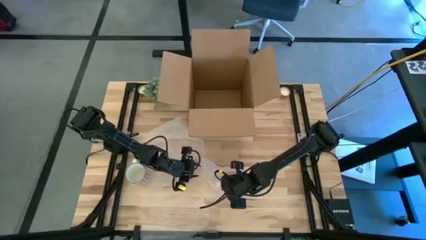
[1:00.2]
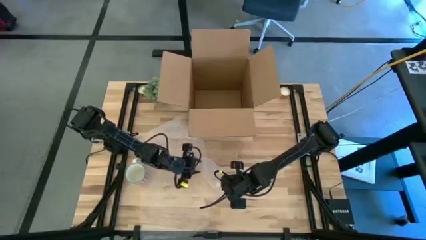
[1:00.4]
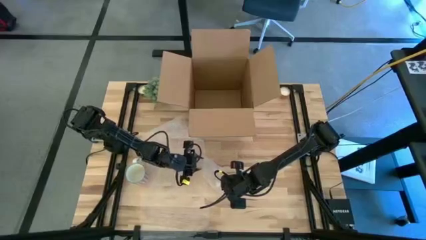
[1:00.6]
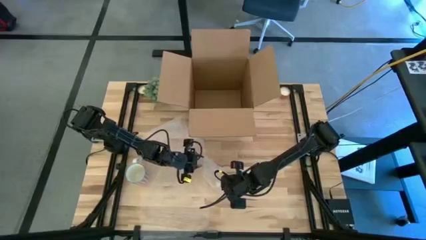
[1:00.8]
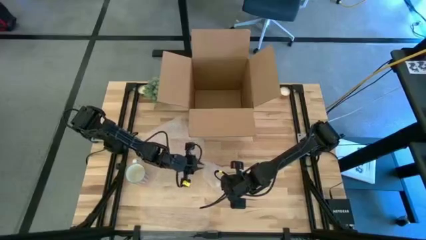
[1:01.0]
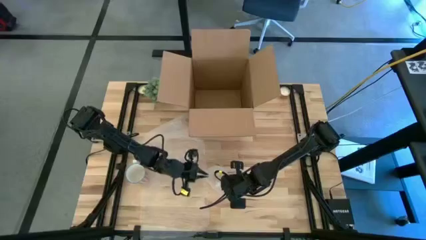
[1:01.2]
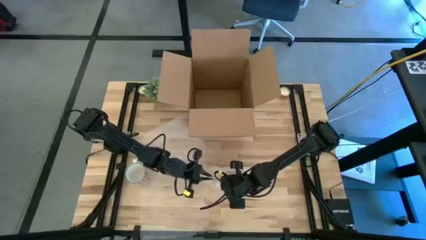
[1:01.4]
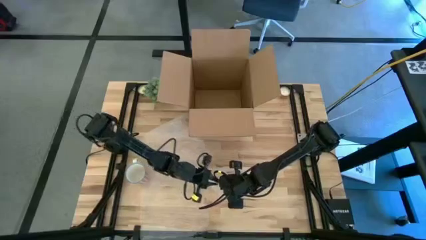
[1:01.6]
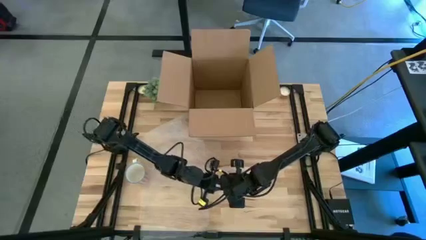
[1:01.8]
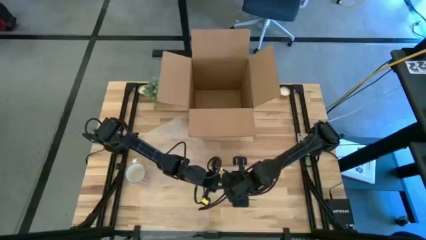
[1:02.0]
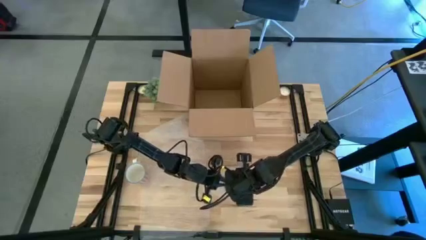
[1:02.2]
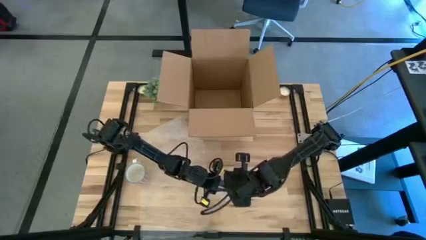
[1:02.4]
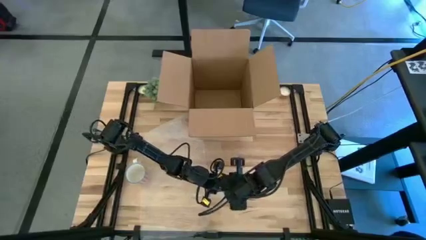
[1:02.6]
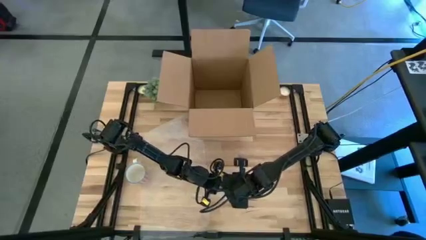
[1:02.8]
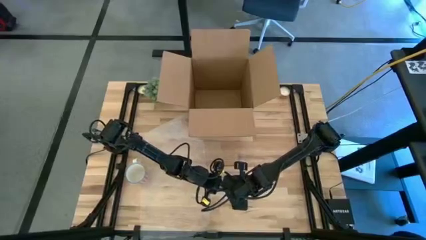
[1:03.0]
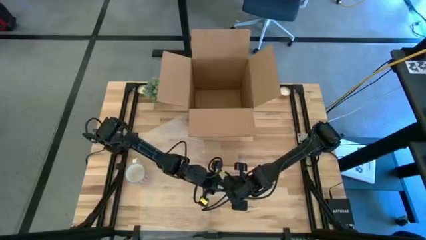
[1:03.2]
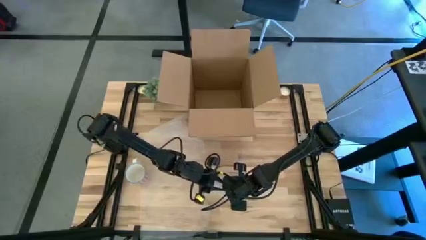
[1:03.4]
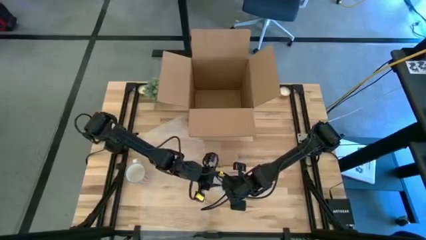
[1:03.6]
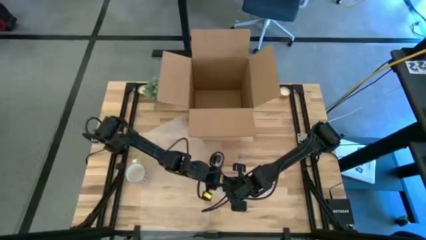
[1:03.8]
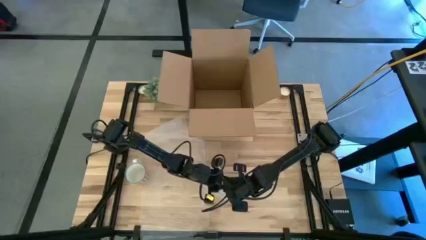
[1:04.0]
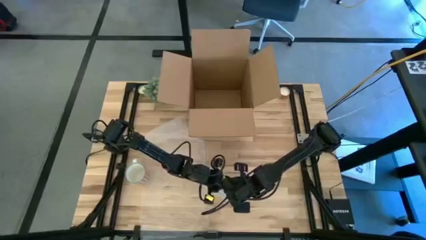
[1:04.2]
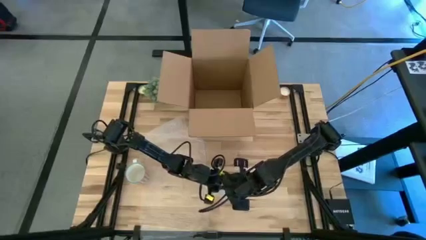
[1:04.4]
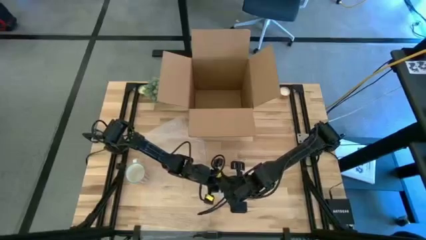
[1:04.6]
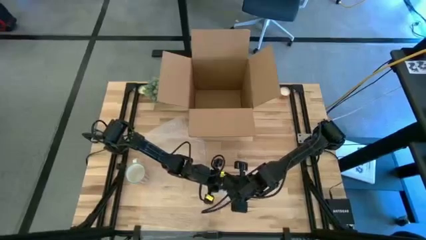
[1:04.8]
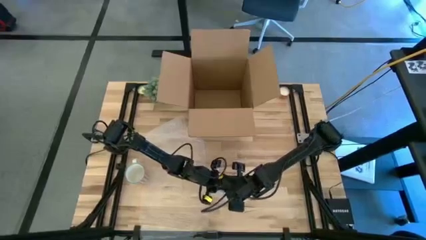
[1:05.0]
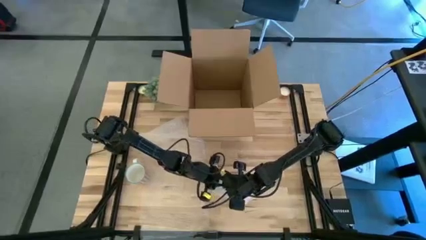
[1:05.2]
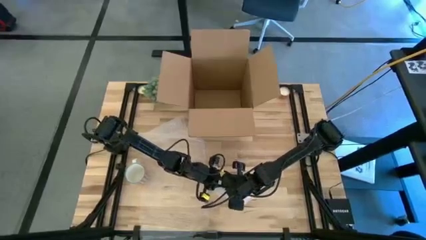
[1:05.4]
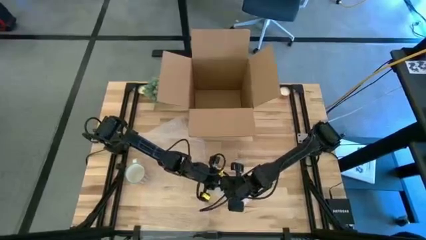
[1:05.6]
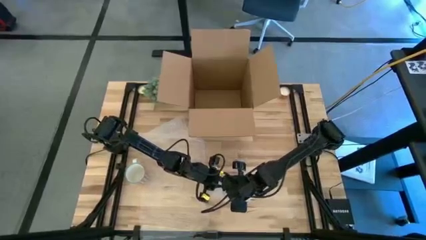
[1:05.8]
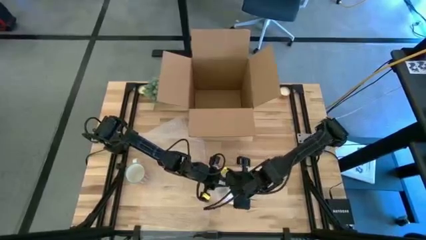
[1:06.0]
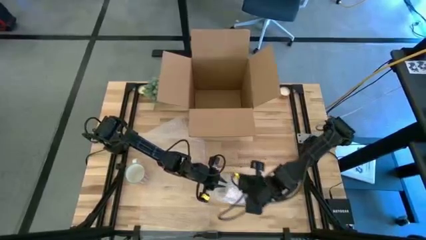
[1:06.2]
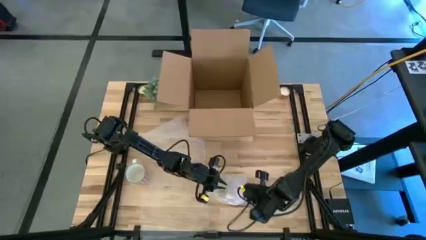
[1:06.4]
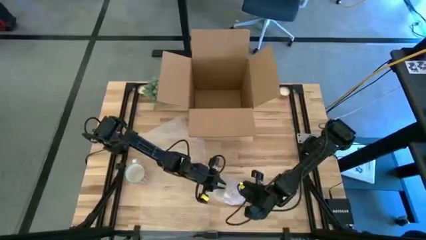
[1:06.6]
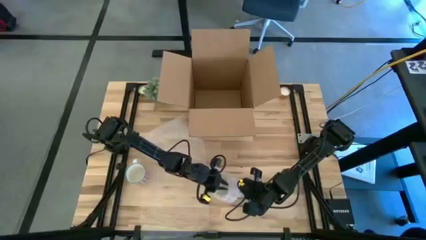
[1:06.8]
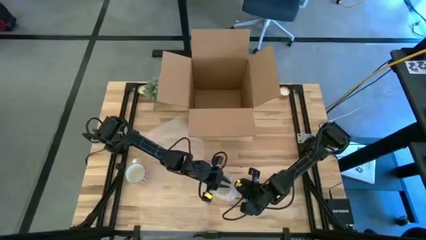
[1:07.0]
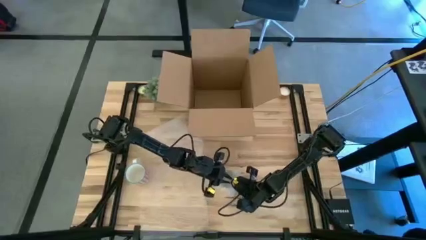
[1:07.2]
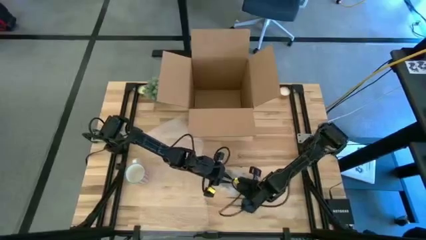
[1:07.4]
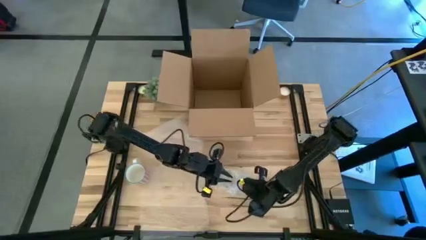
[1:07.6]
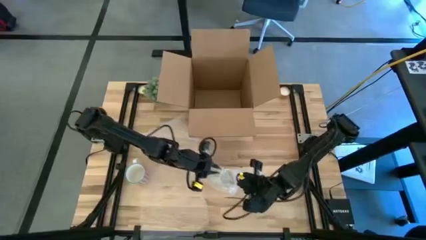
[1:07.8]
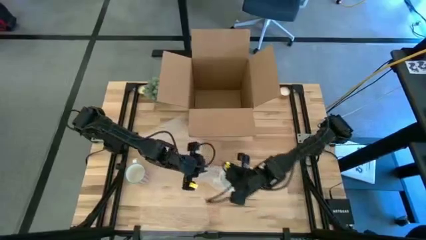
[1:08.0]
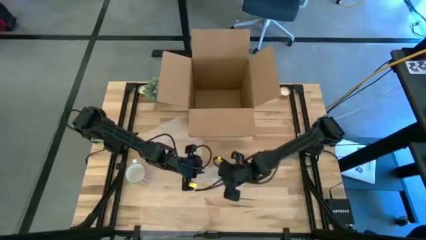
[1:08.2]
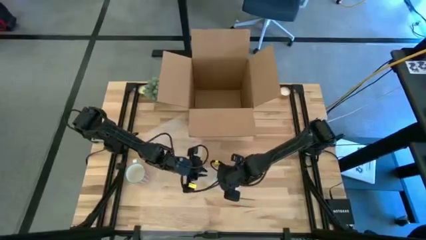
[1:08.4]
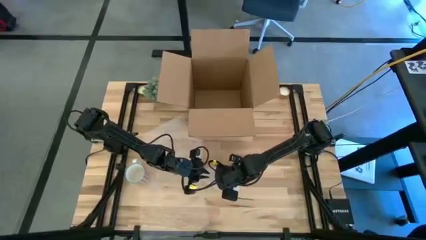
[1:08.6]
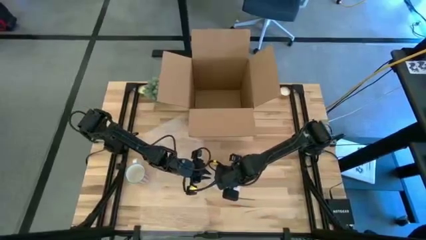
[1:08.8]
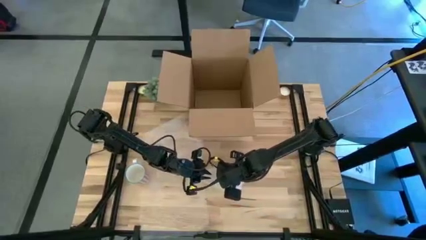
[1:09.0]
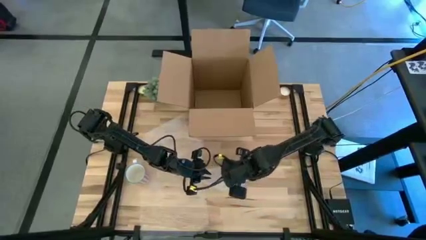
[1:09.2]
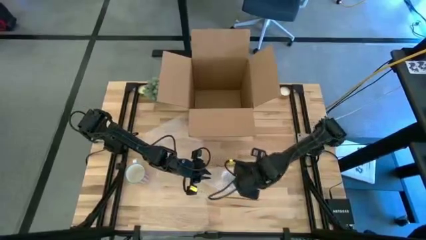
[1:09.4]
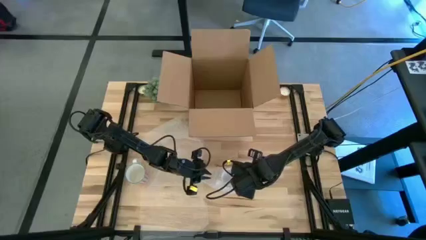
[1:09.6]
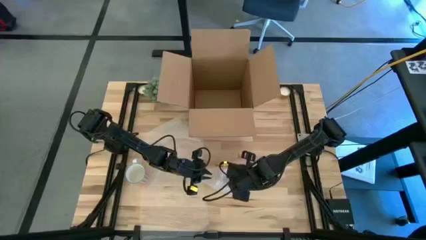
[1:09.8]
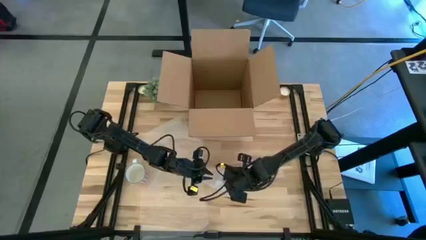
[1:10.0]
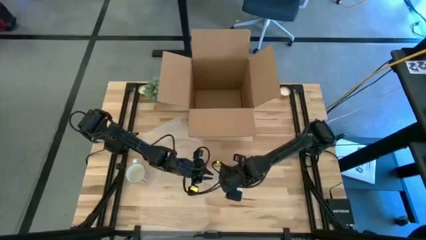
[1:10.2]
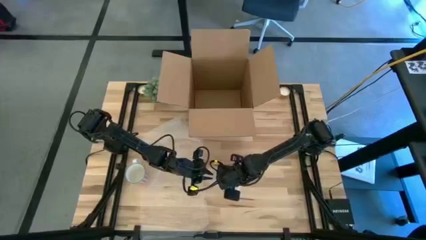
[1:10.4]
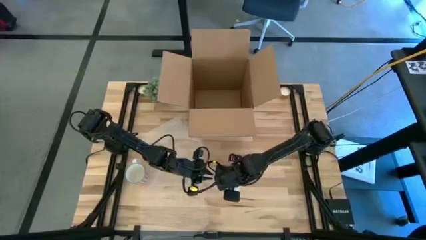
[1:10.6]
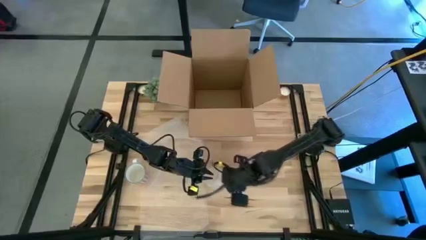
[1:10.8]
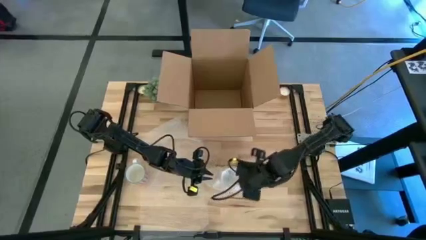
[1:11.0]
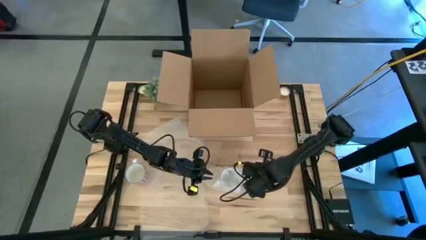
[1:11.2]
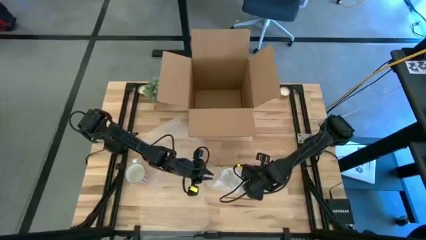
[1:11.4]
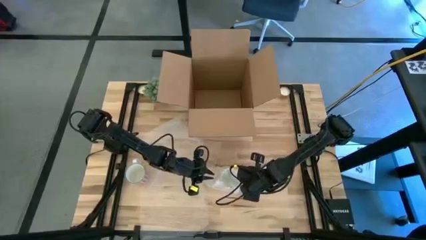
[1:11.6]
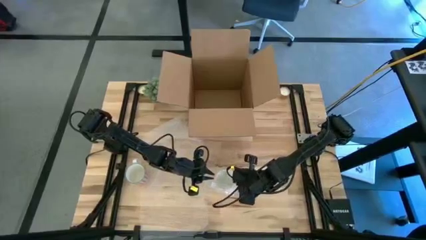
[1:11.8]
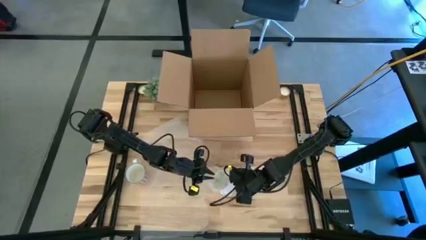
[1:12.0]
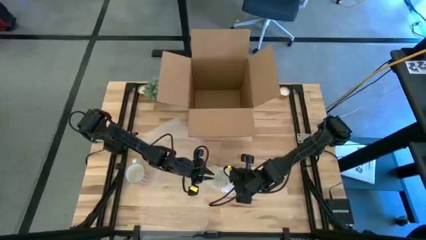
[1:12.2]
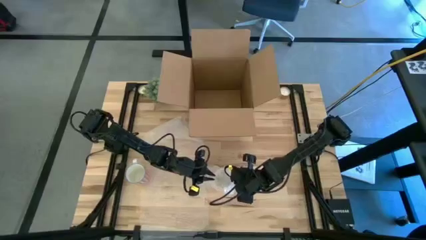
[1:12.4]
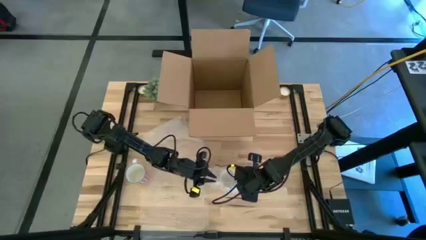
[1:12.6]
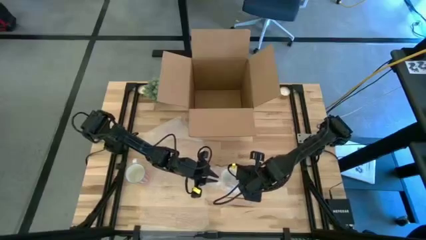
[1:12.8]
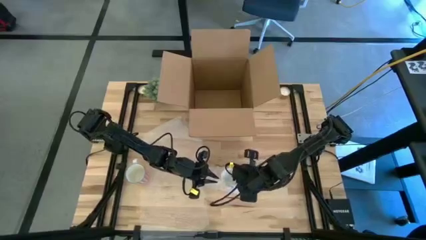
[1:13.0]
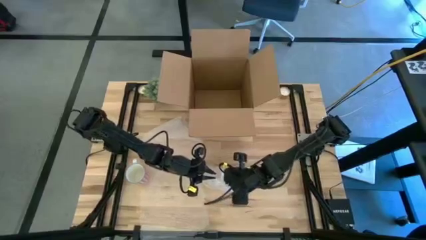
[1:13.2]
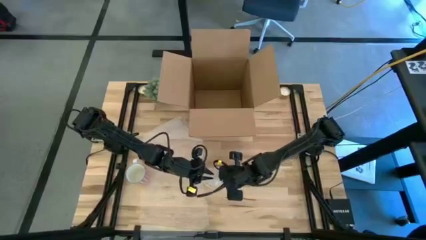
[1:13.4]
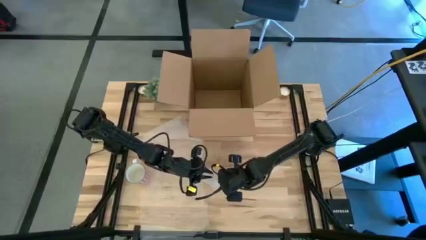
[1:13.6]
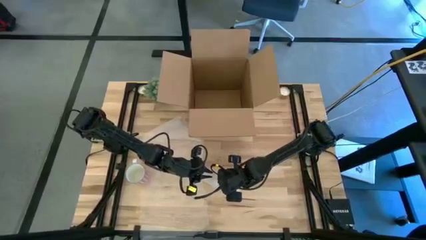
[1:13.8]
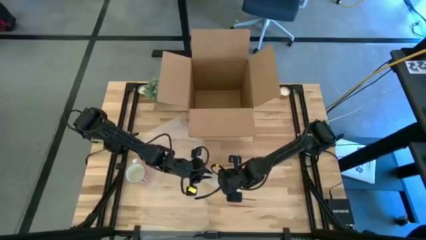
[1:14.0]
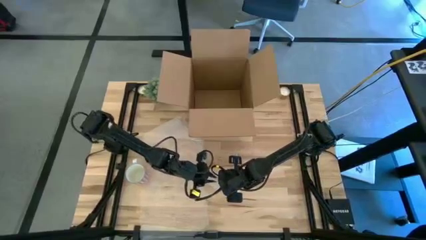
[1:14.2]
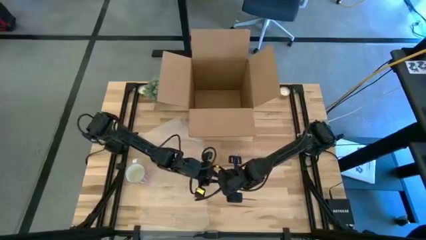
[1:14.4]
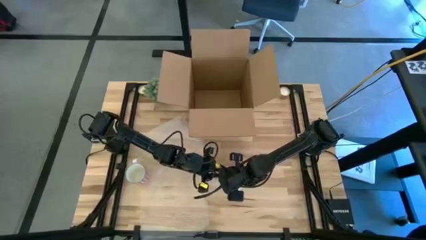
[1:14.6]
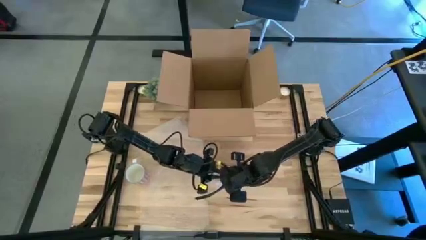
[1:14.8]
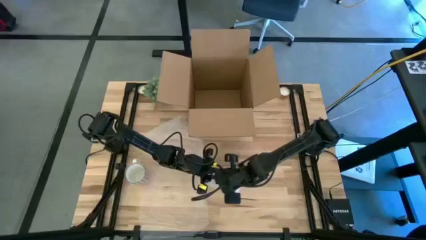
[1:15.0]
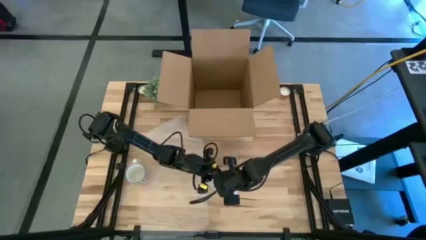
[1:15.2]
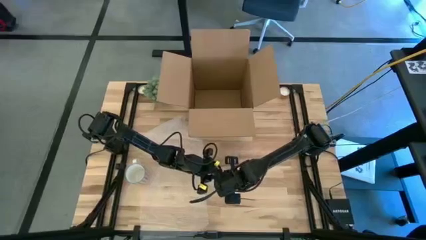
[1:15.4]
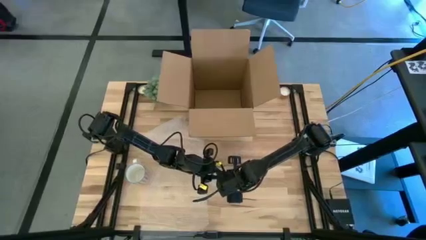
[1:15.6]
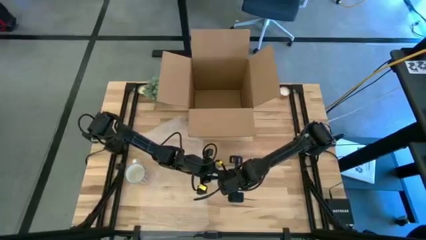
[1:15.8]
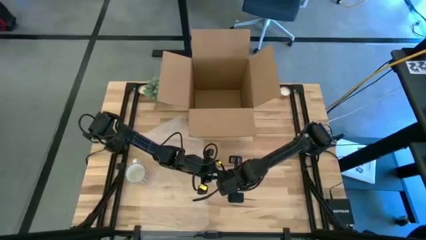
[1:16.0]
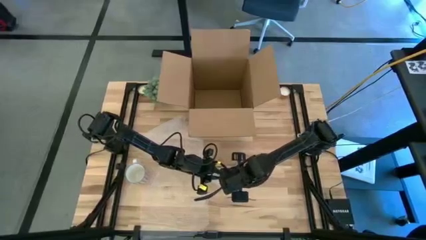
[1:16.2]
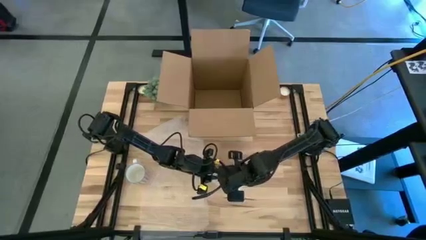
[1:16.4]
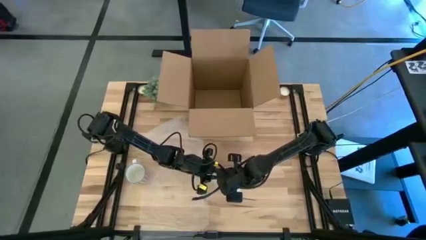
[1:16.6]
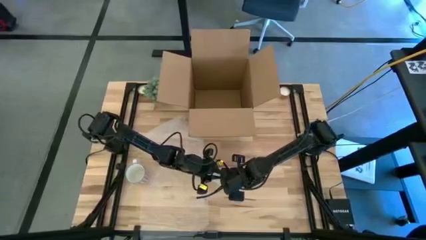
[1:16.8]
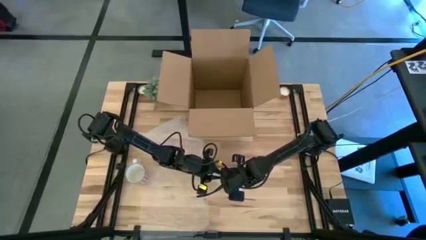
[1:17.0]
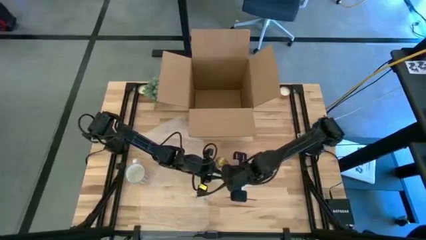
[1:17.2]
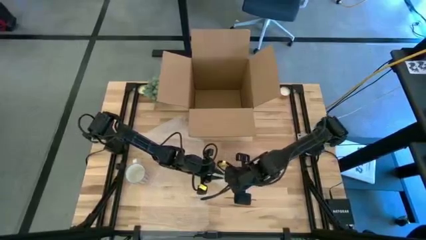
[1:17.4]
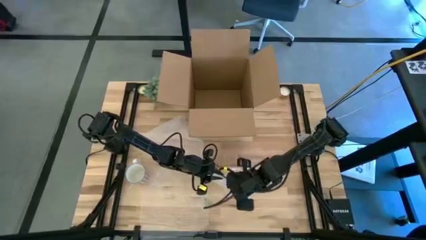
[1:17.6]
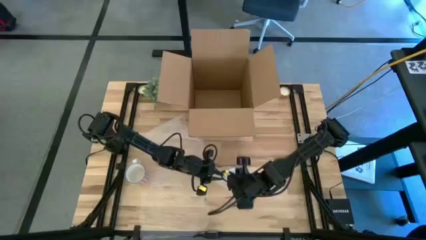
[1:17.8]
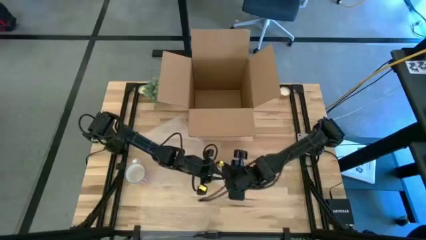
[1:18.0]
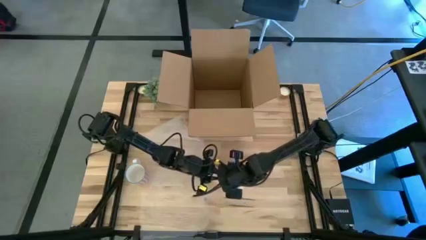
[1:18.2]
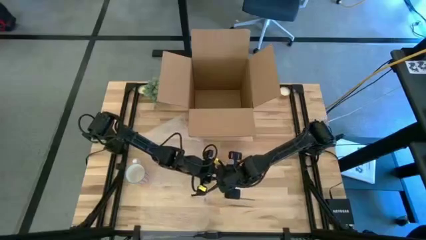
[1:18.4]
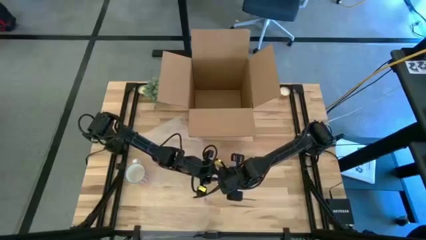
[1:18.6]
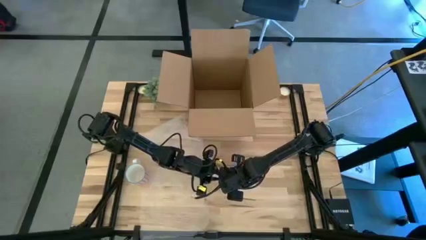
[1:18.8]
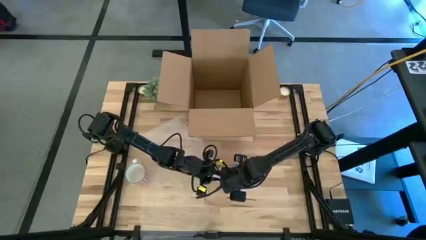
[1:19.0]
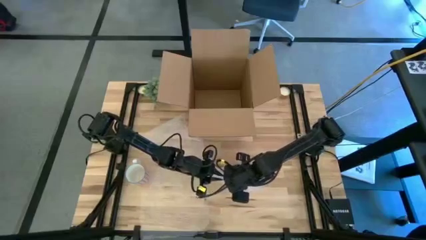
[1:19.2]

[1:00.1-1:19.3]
Task: wrap mug
Wrap the orange mug with the bubble wrap
